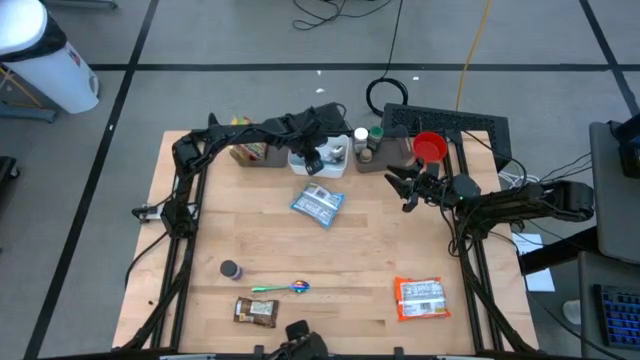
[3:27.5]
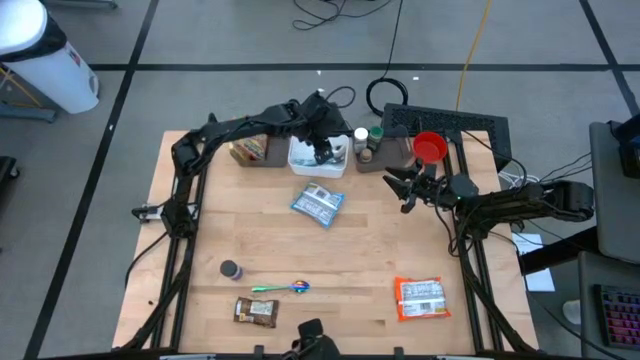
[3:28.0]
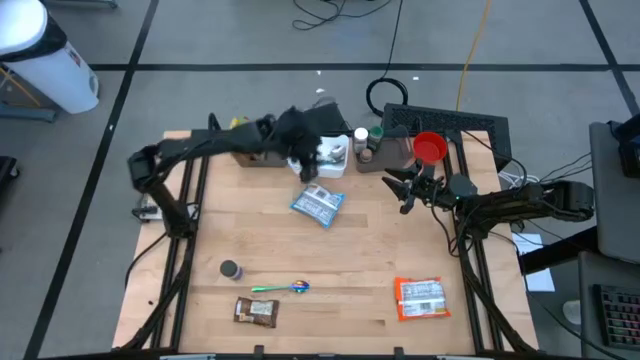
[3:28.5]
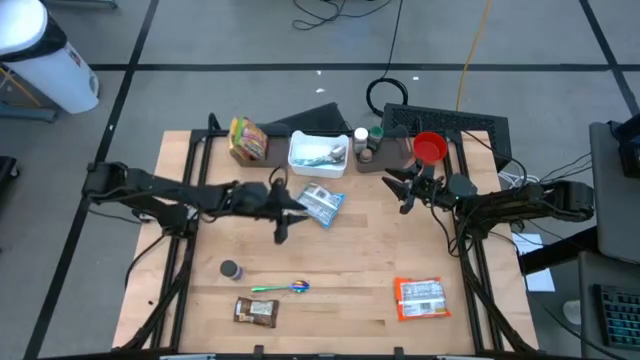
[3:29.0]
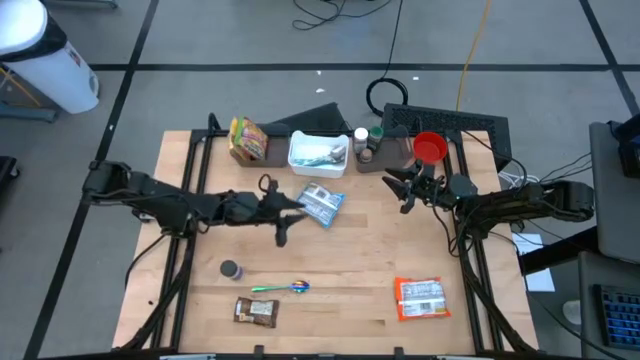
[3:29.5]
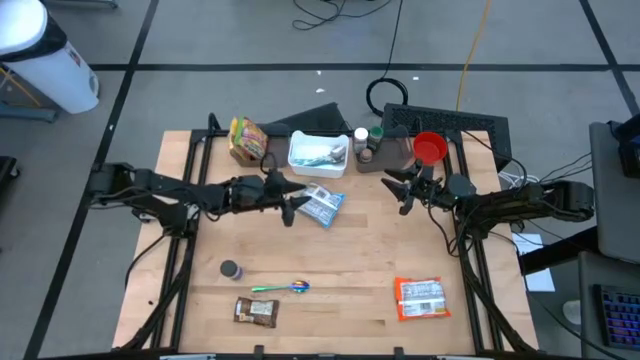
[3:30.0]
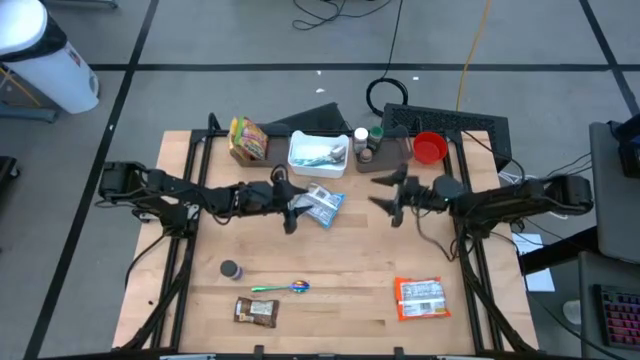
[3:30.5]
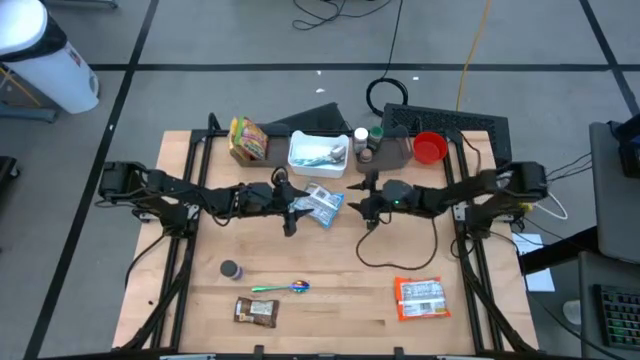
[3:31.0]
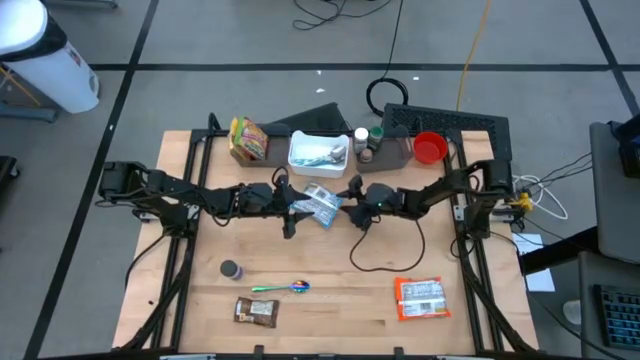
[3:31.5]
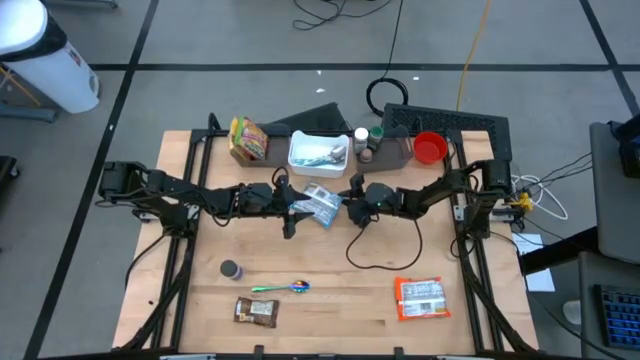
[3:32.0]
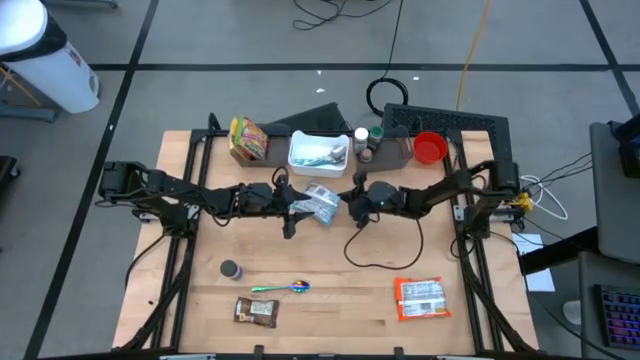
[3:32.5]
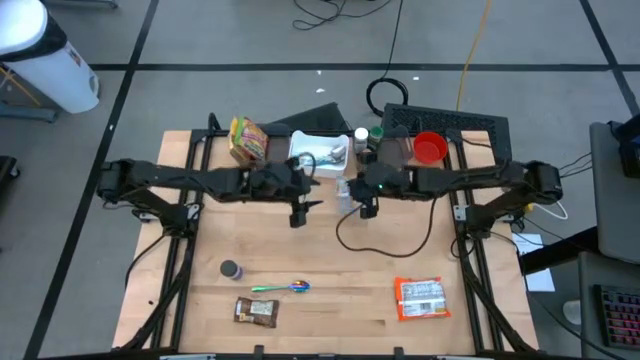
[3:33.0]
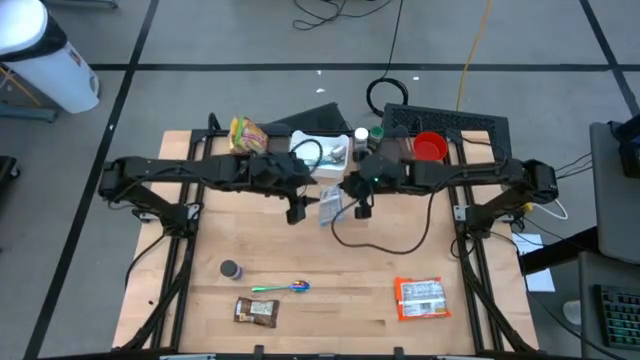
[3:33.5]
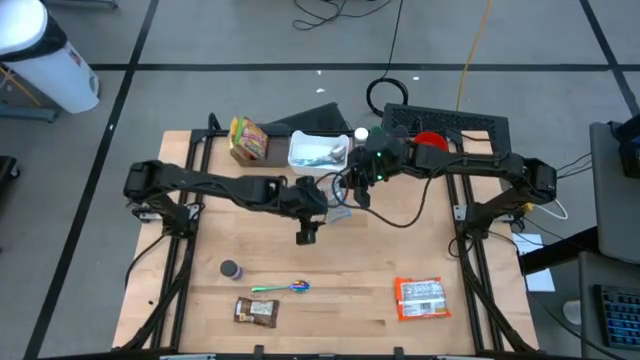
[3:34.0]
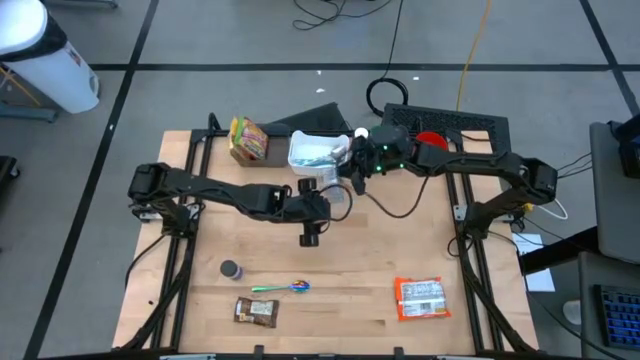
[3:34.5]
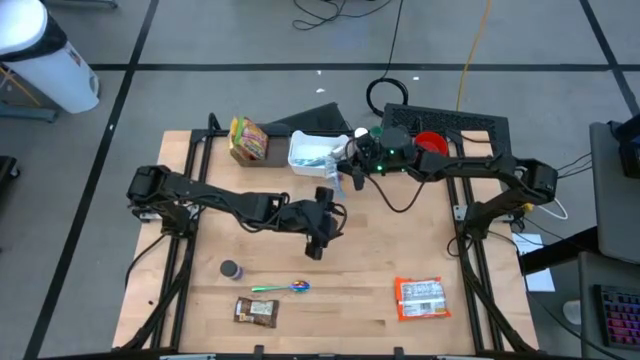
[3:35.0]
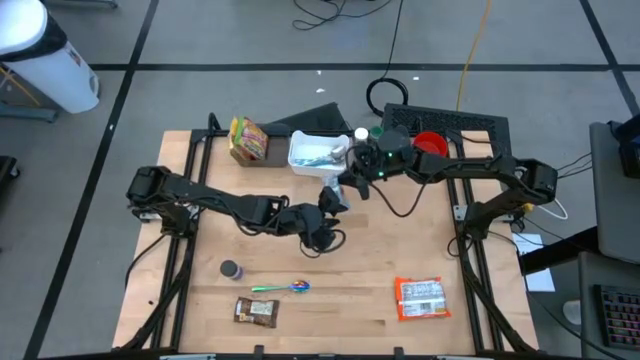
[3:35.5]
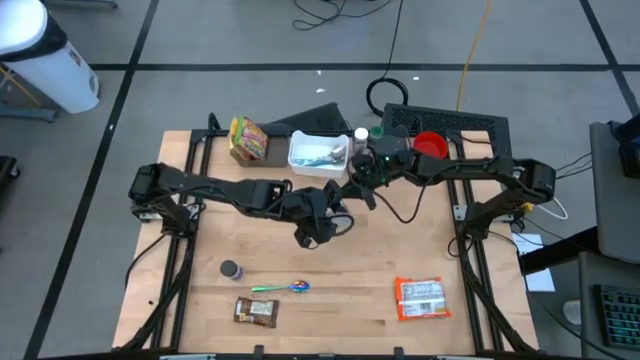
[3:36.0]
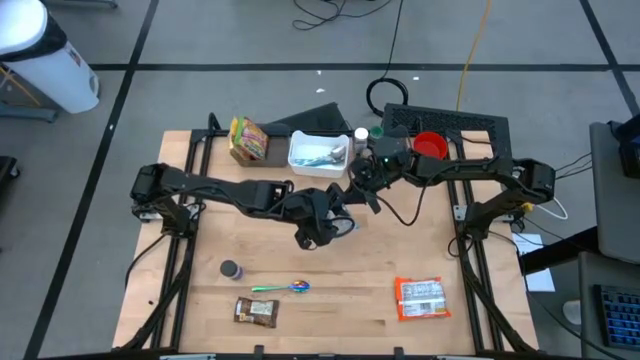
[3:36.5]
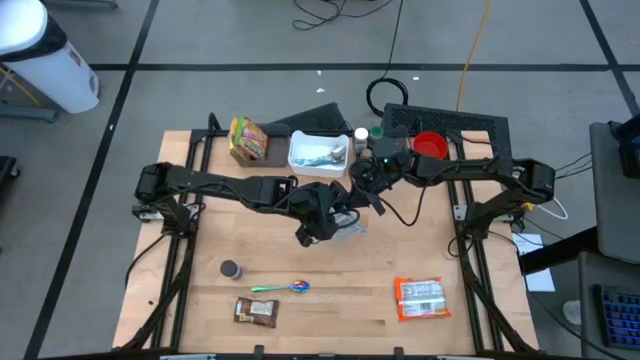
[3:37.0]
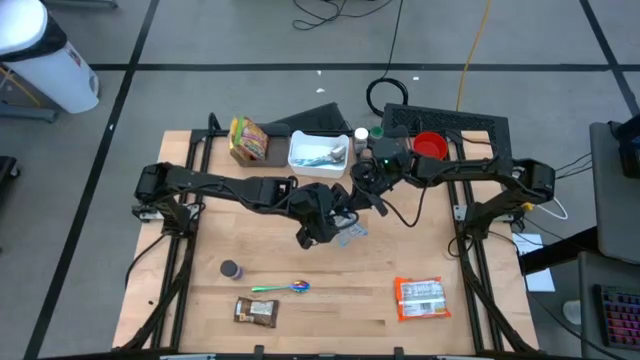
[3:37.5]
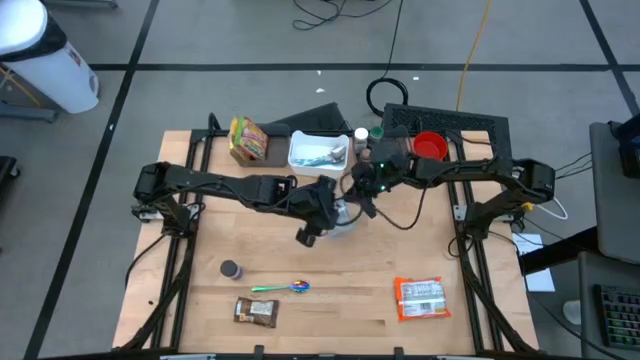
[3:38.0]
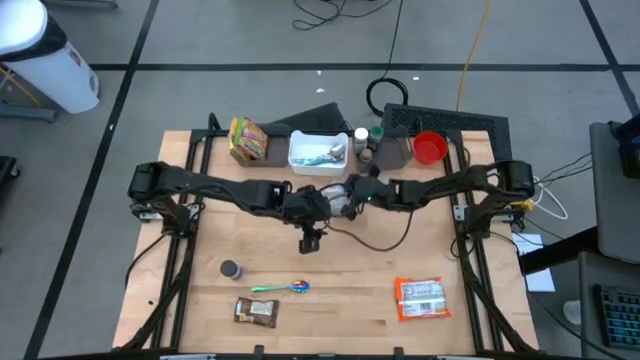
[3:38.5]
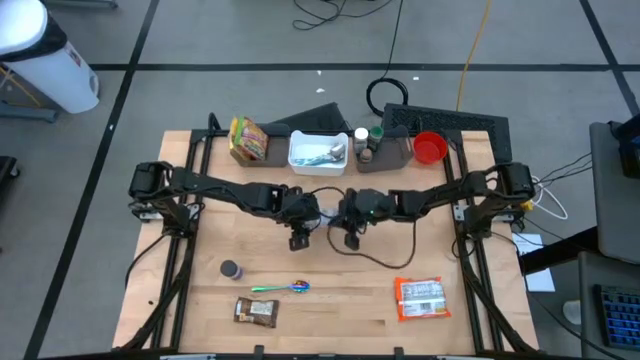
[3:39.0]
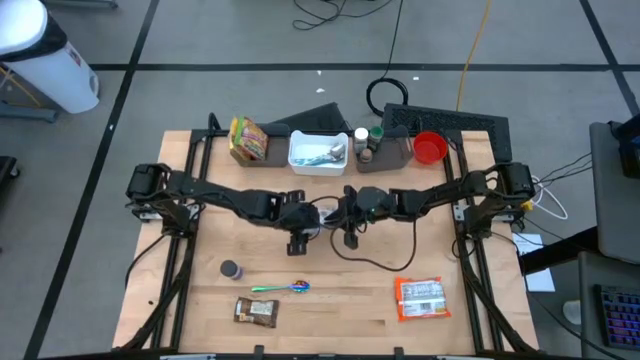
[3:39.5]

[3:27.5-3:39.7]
Task: Pick & Place Food Item
Put the blue noodle pack into the left black bin

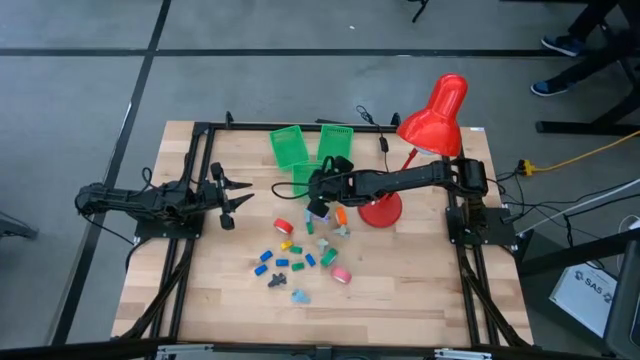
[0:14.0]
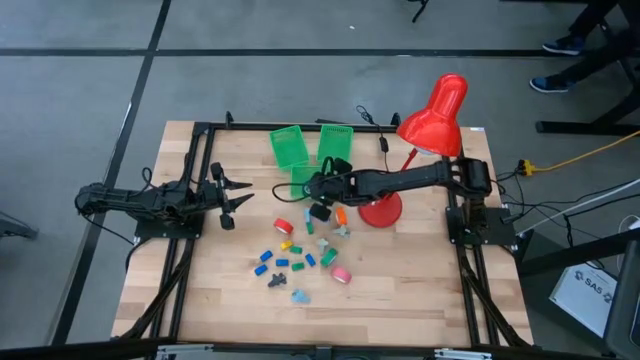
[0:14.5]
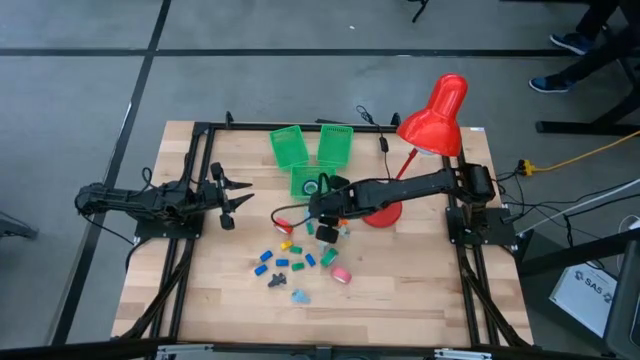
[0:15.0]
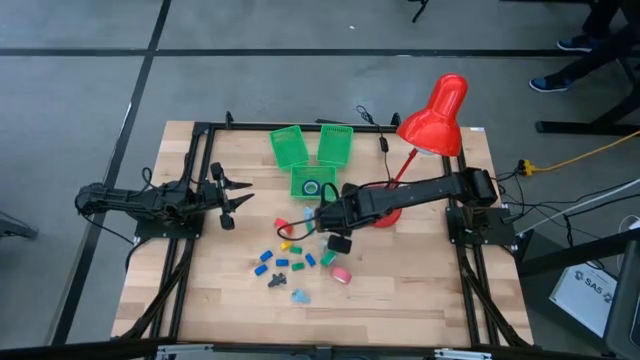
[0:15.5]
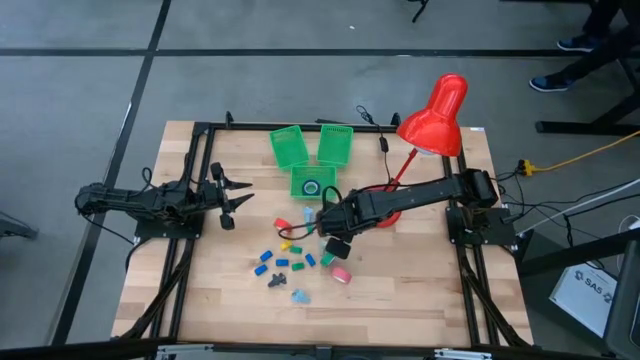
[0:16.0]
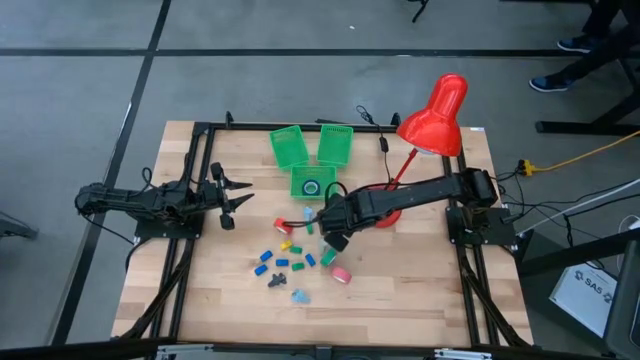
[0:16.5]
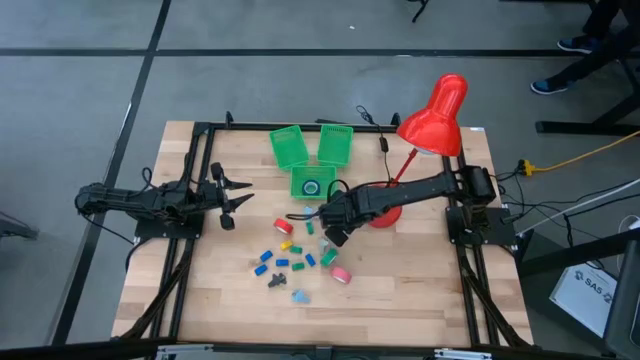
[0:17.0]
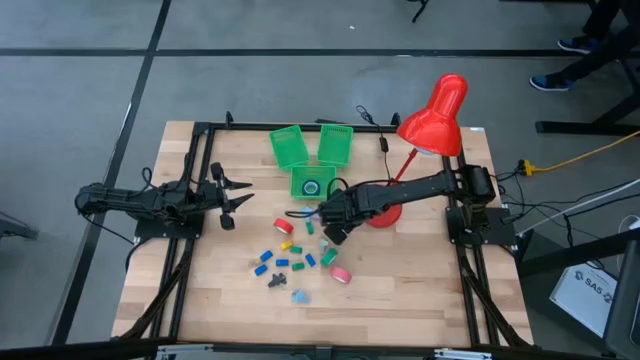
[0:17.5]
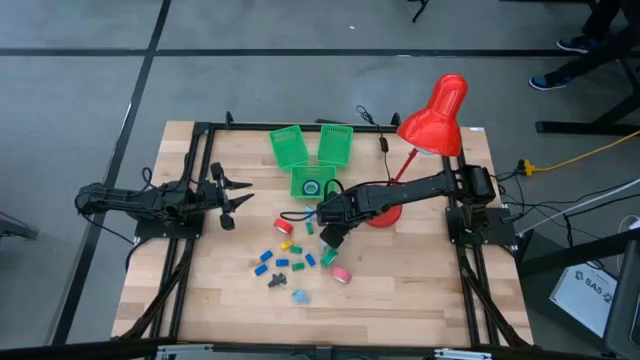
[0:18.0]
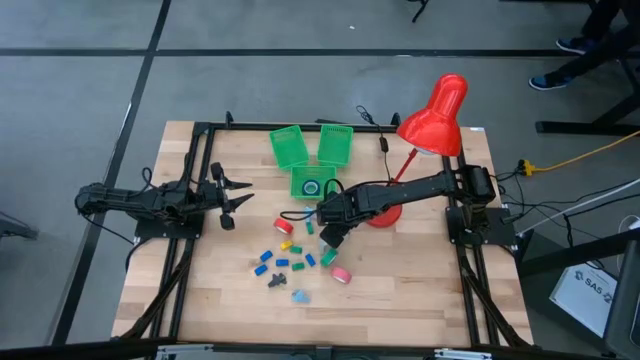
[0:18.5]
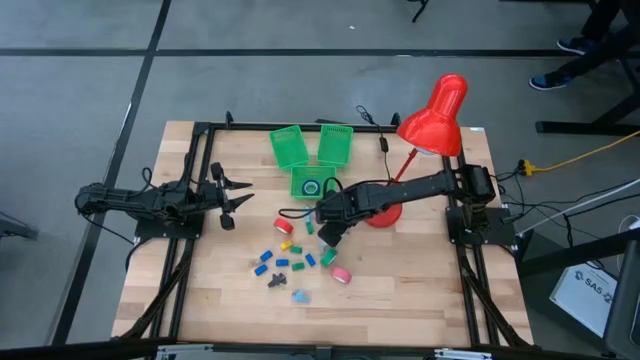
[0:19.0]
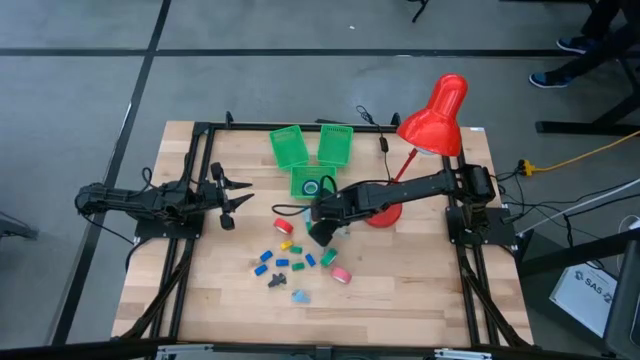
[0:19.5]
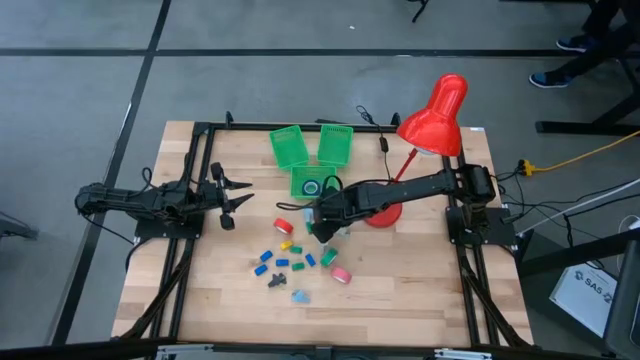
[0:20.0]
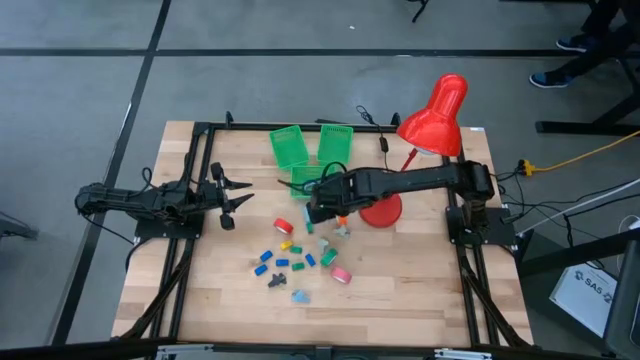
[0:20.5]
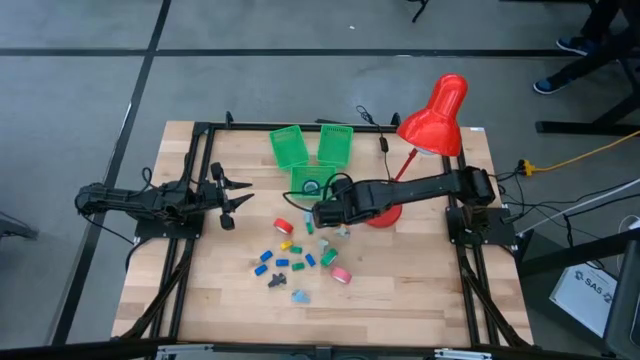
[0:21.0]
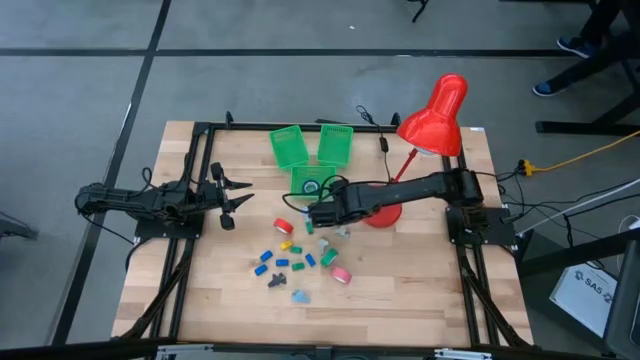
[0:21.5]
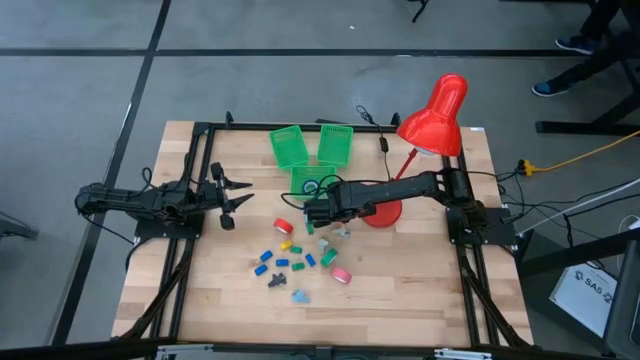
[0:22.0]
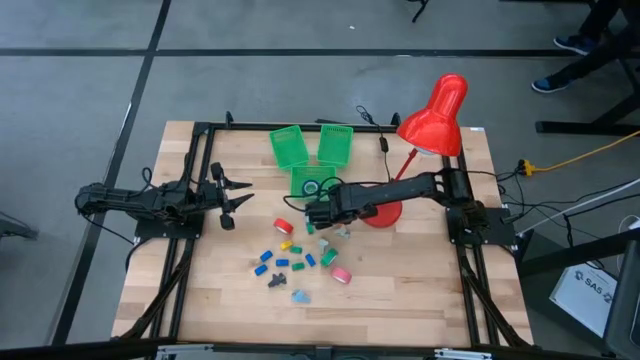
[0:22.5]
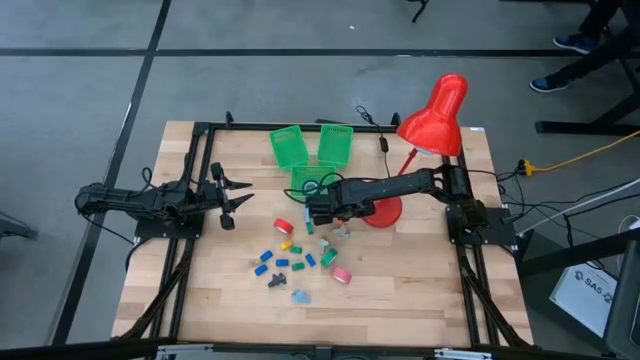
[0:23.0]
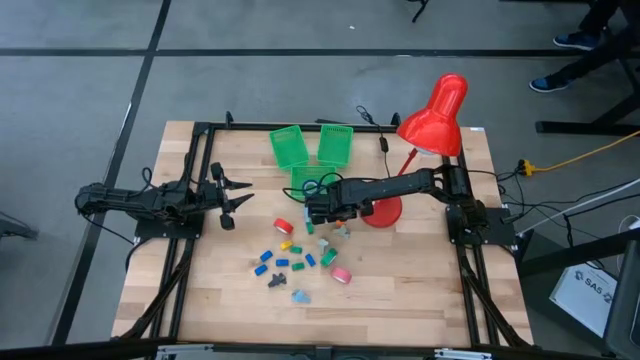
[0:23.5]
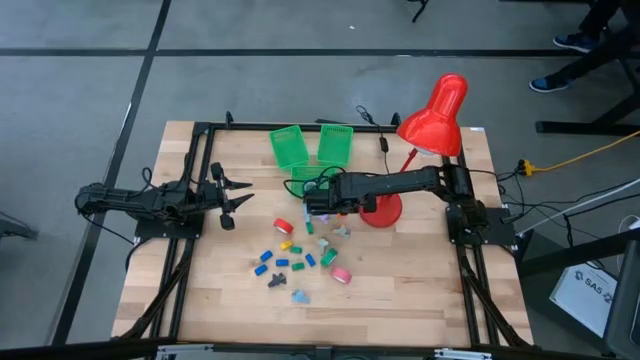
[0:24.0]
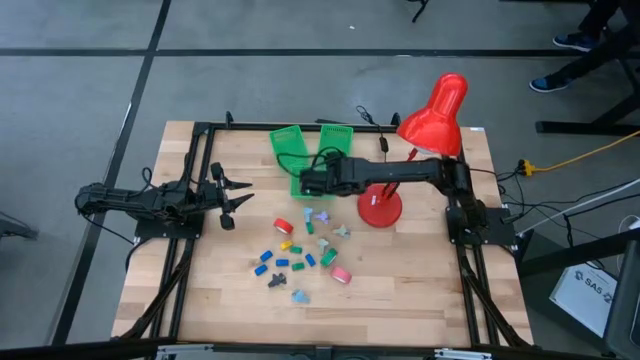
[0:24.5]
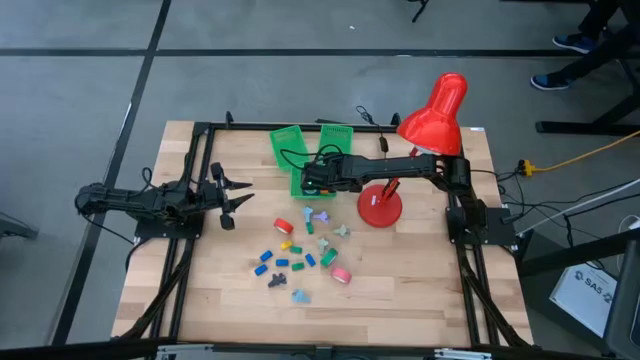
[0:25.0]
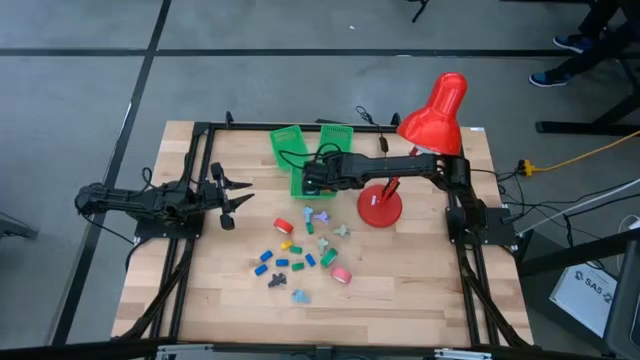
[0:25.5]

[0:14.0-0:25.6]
Task: Pick and place Stapler, Stapler remover, tape
Put the orange tape into the middle green bin
